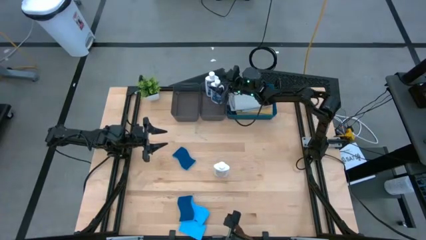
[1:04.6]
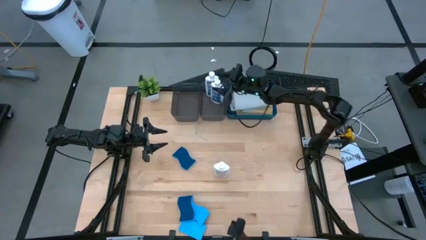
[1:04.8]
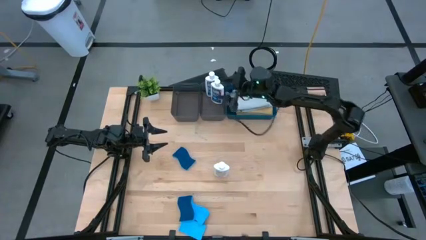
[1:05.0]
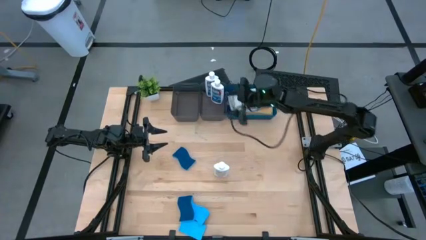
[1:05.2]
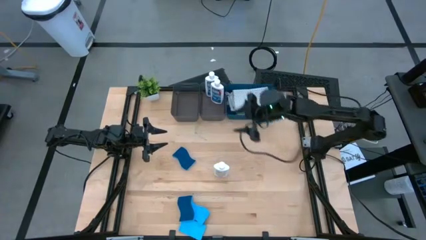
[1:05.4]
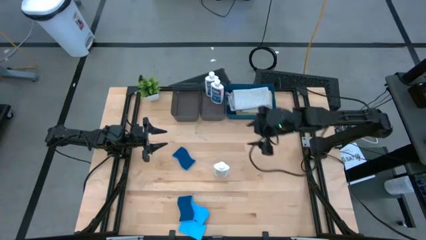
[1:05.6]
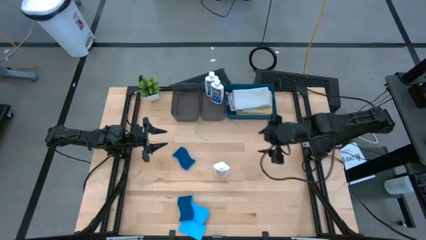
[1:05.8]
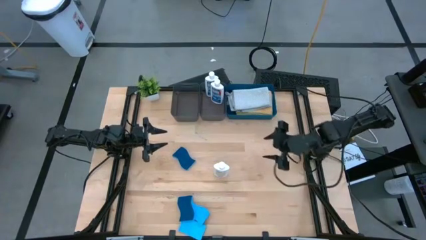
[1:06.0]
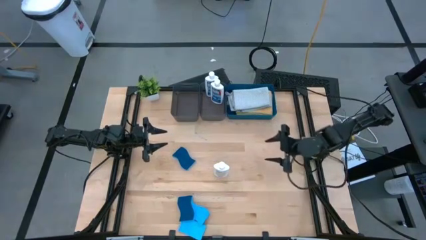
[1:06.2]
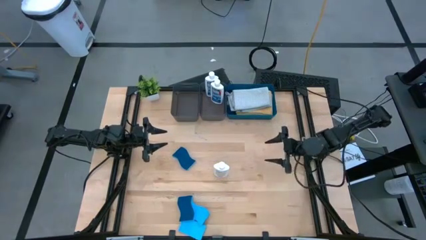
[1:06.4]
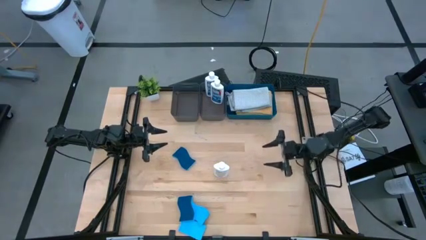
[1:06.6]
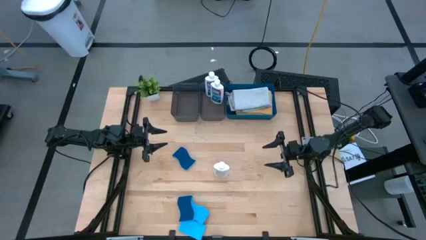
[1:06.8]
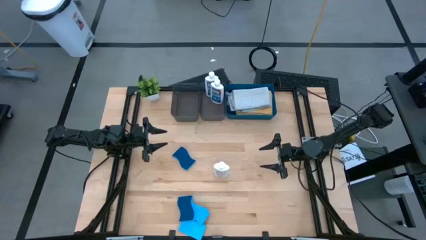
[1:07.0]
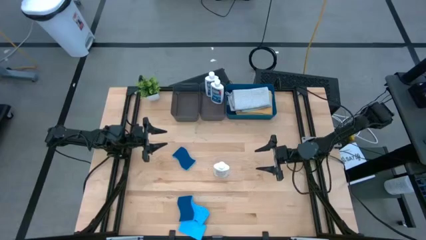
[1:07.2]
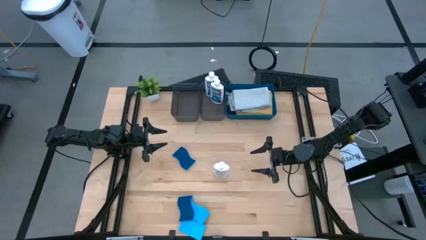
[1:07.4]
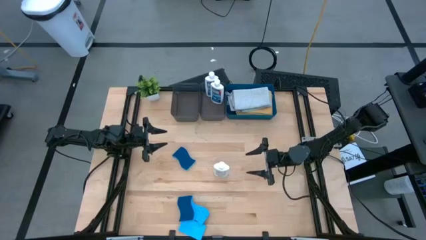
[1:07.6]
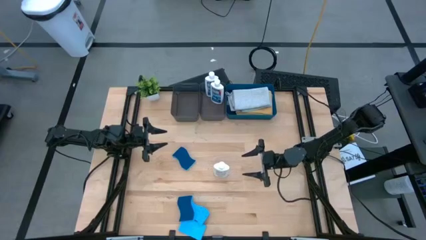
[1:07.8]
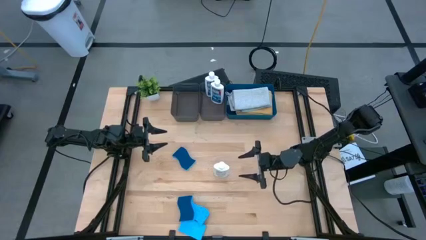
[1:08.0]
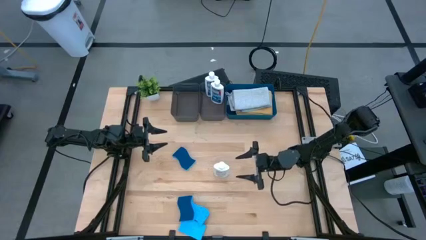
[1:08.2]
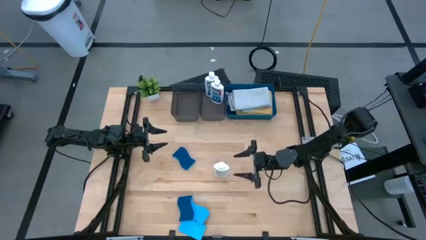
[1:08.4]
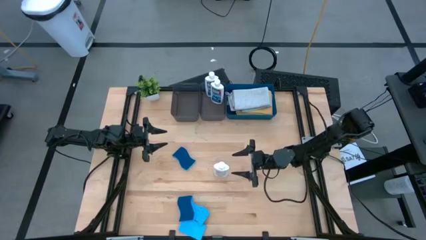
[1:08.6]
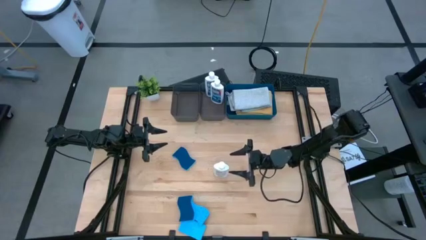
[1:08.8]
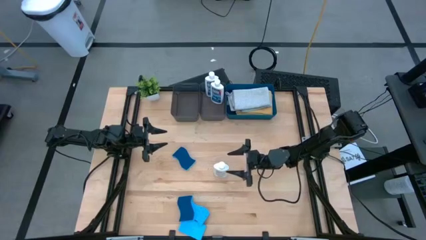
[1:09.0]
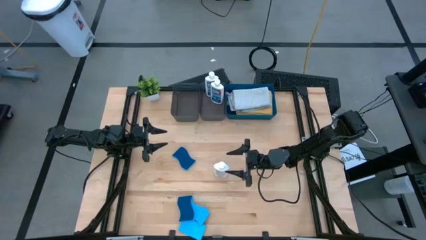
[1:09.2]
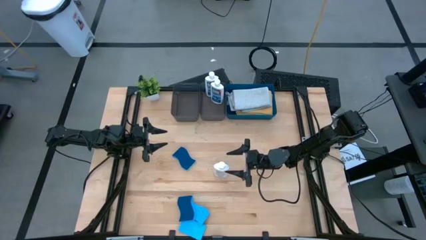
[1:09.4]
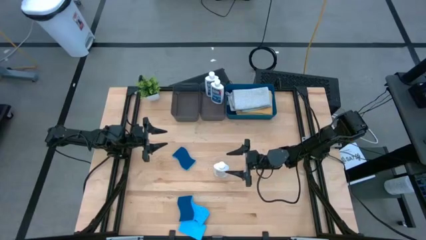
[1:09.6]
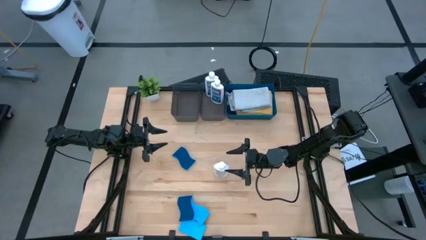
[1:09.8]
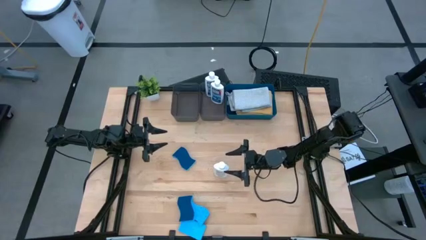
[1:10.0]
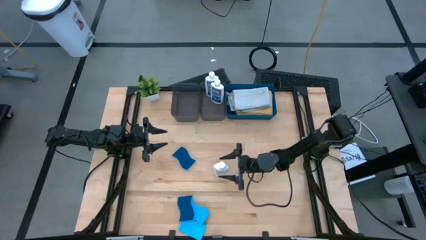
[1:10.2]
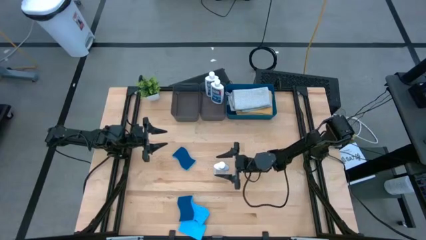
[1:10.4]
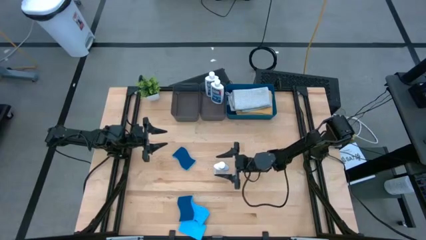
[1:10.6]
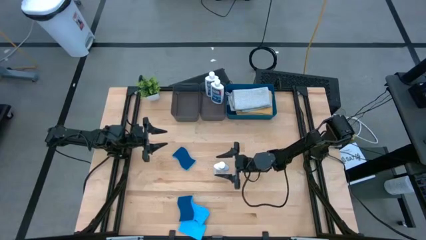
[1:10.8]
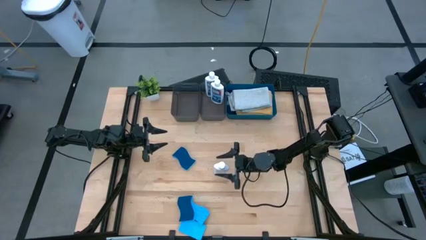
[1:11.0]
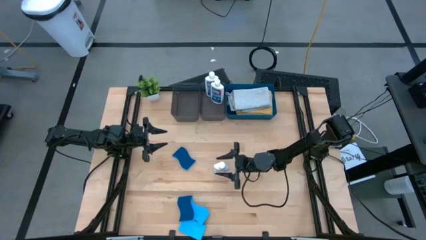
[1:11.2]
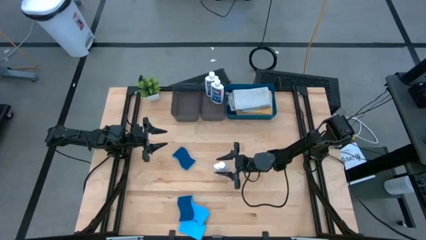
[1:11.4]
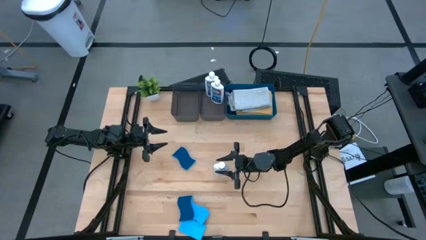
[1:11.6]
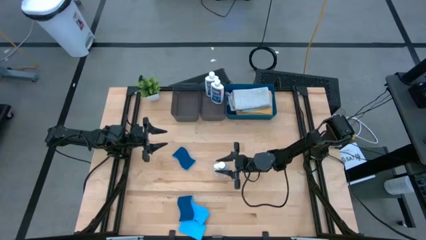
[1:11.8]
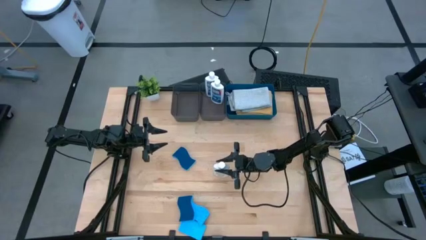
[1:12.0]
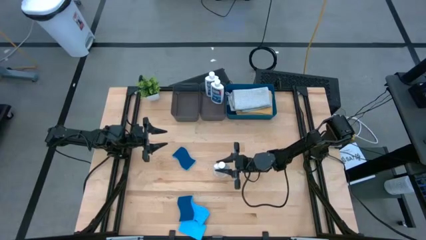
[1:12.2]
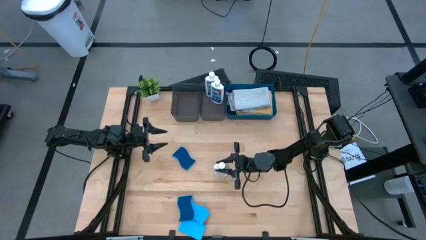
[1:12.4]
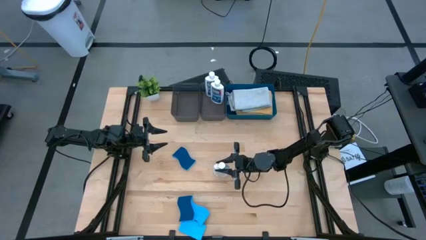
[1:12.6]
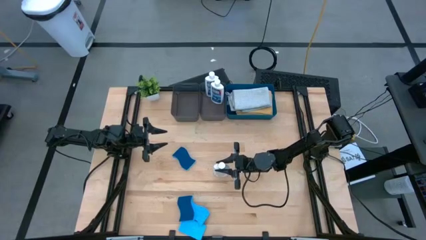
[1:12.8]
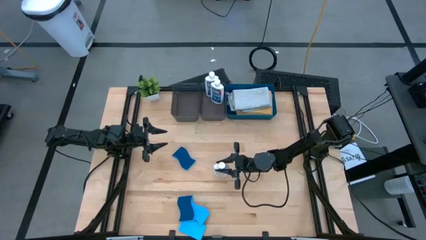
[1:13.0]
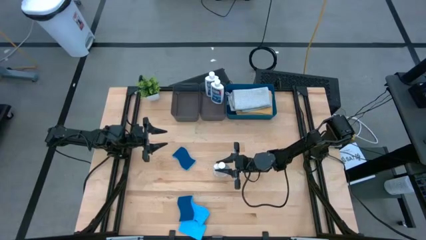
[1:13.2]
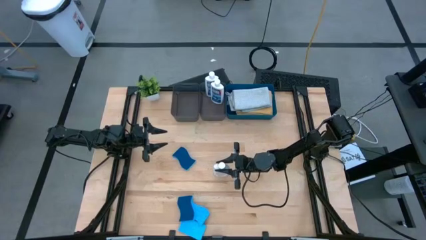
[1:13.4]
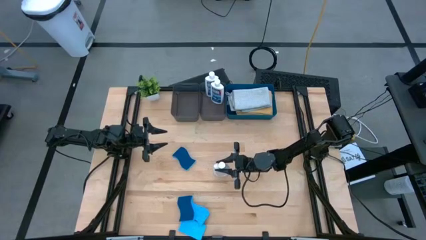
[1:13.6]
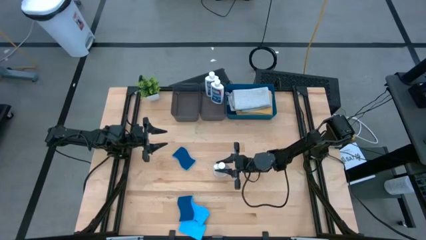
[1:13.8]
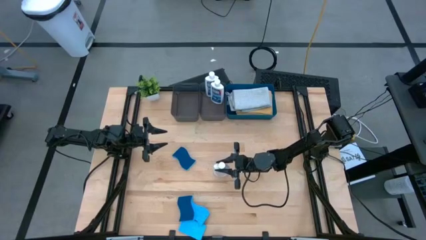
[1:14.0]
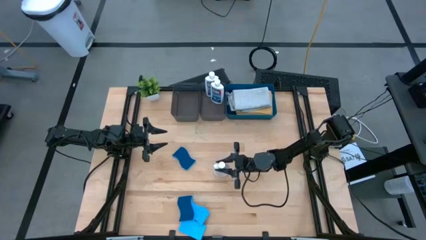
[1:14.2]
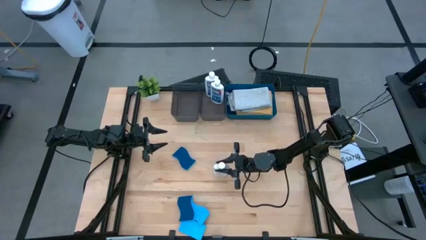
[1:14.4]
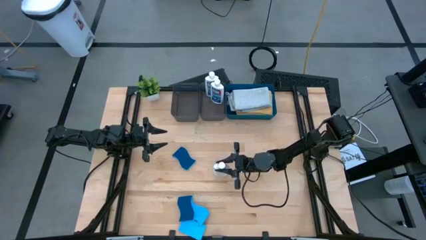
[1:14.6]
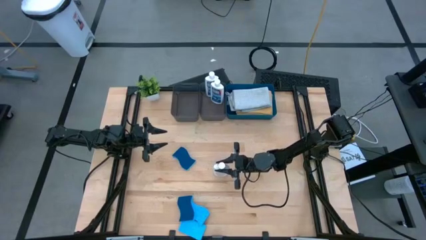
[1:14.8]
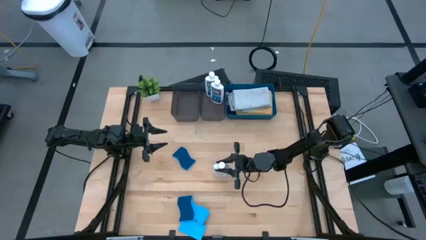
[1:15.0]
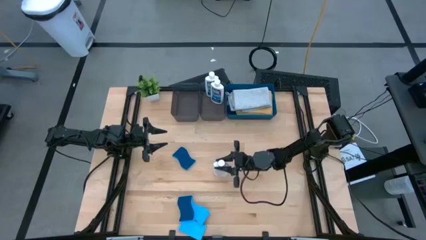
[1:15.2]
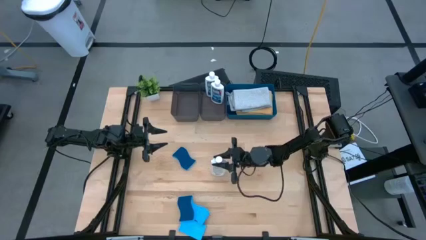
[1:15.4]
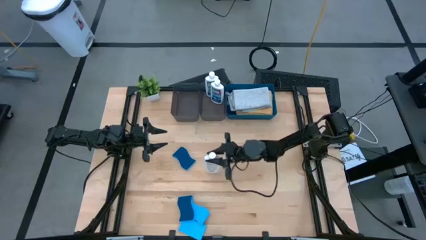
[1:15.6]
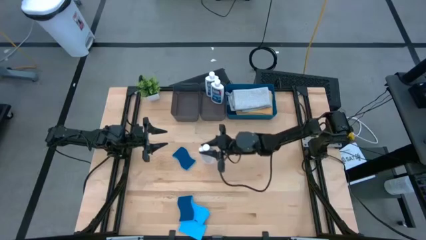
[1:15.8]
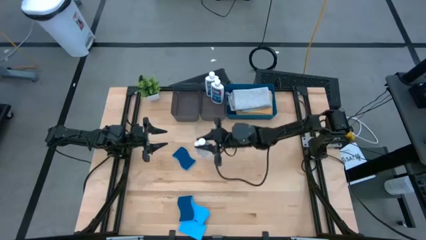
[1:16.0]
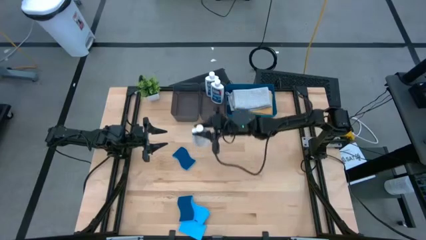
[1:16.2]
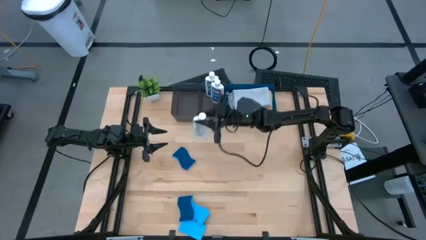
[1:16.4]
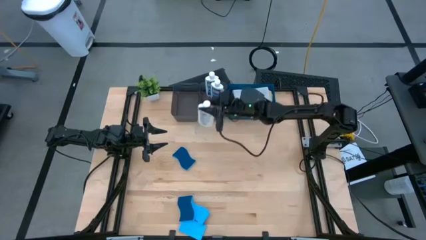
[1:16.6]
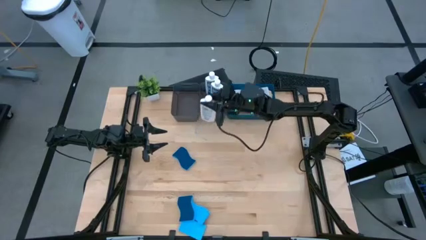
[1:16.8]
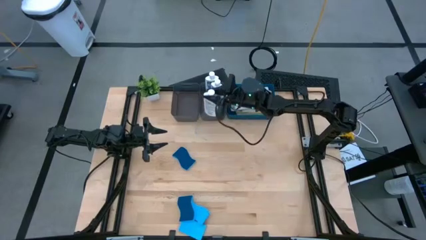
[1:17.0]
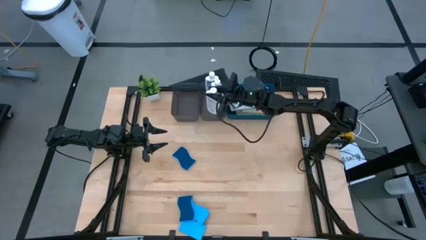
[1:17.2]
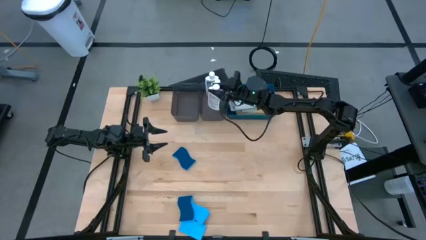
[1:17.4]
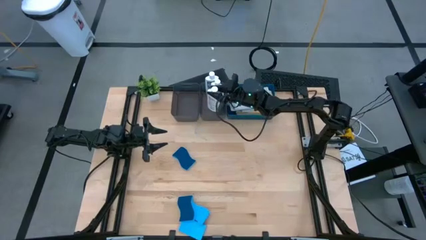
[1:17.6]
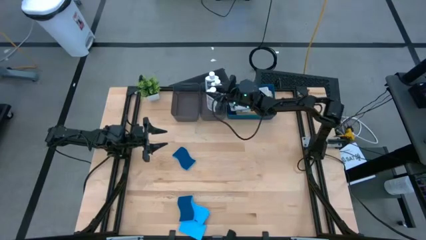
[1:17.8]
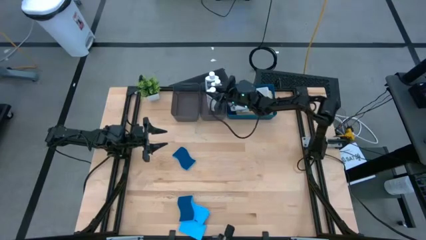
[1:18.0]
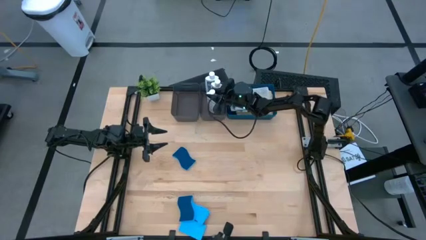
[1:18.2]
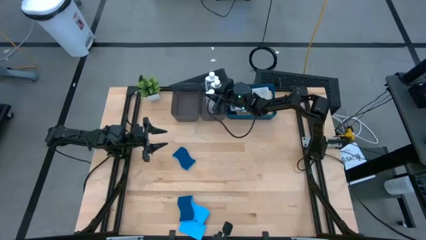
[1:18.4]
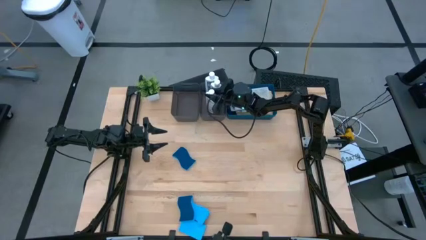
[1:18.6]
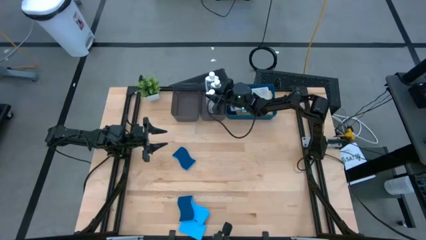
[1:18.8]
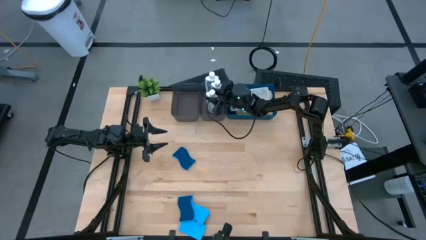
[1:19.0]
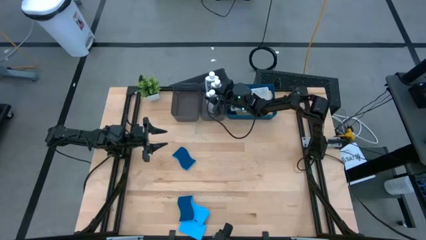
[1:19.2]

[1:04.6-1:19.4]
Task: Pick & Place Kitchen Items
Put the white plastic restorer bottle into the right black bin
